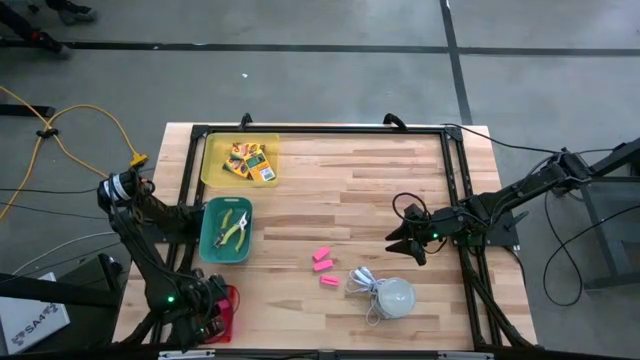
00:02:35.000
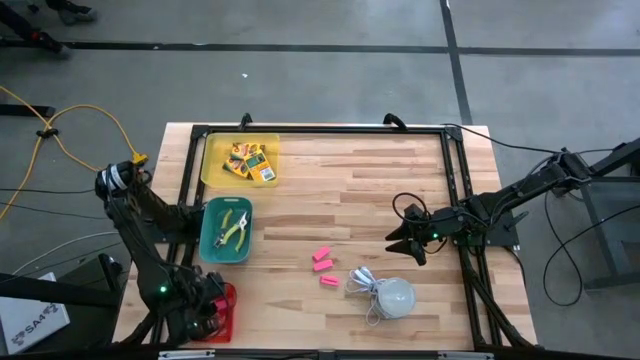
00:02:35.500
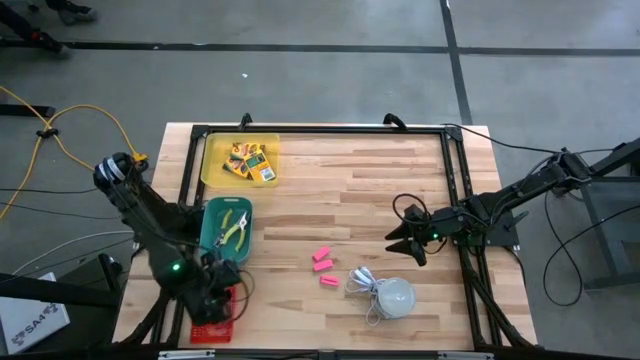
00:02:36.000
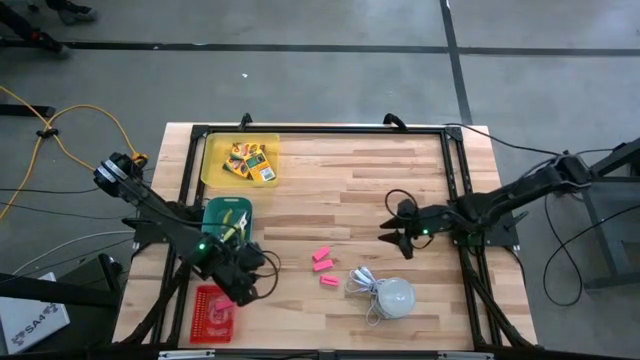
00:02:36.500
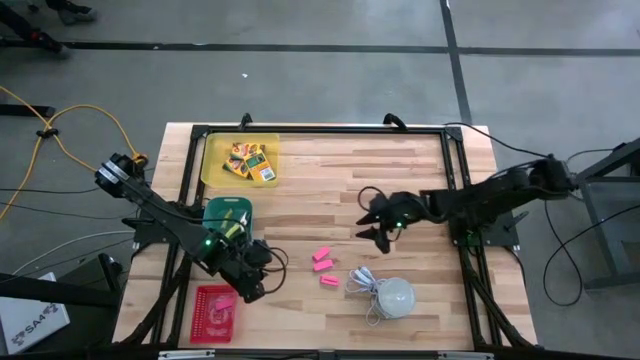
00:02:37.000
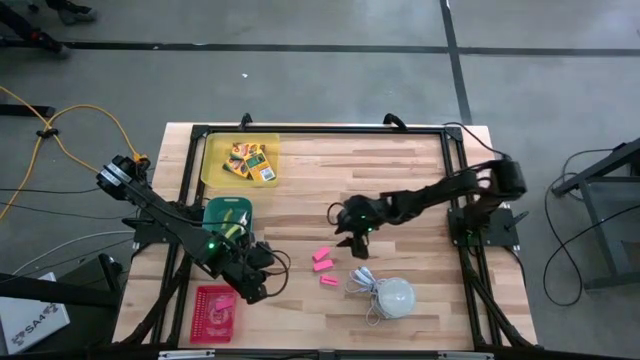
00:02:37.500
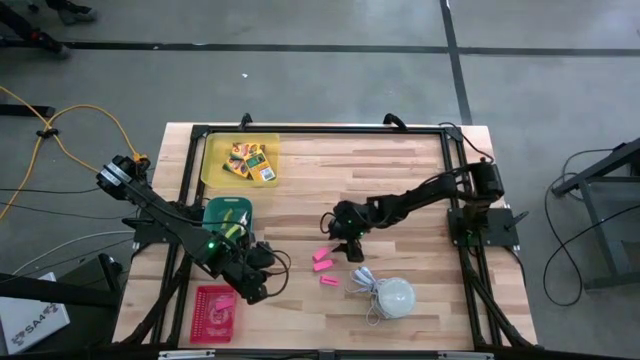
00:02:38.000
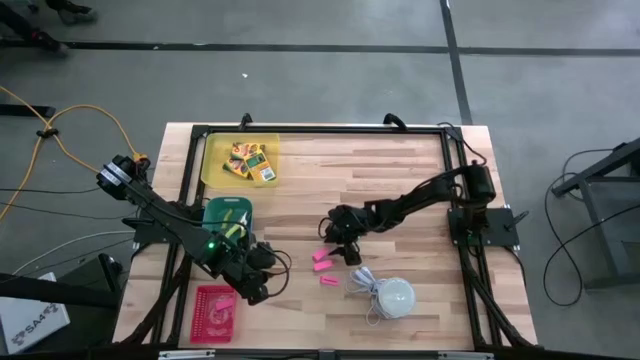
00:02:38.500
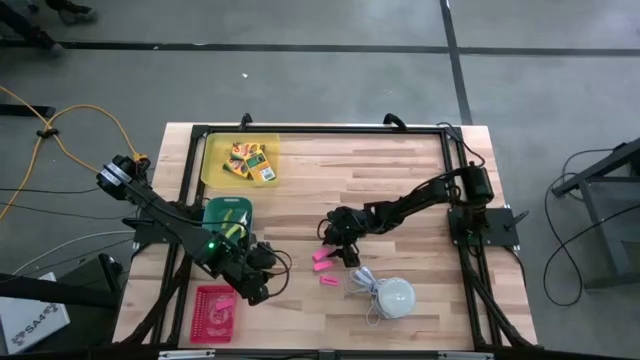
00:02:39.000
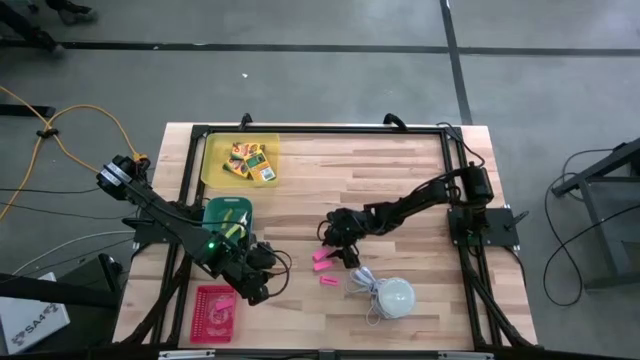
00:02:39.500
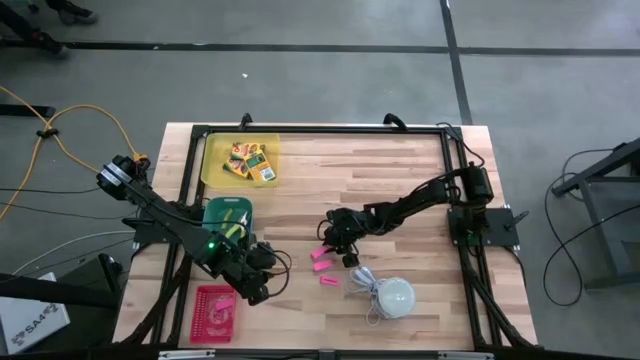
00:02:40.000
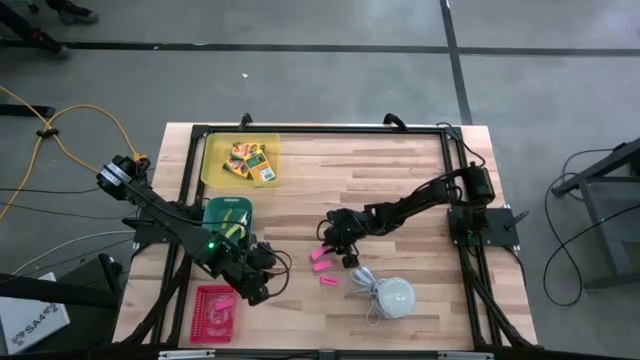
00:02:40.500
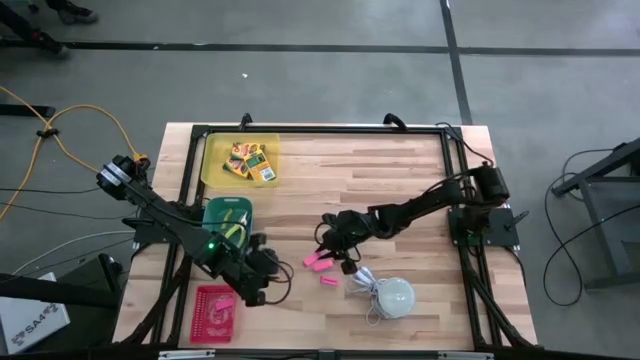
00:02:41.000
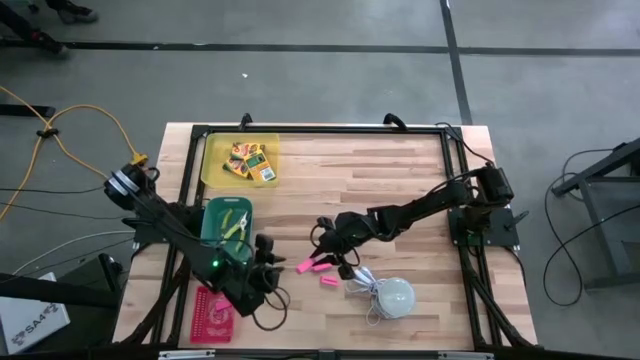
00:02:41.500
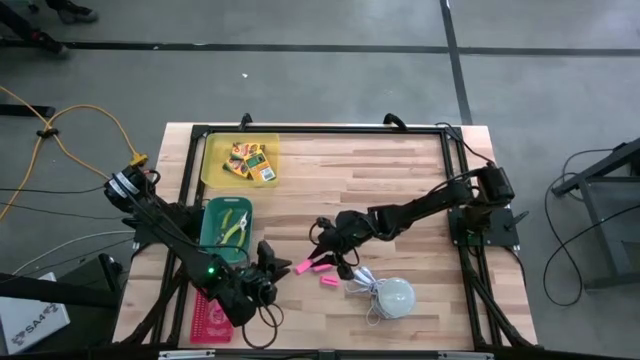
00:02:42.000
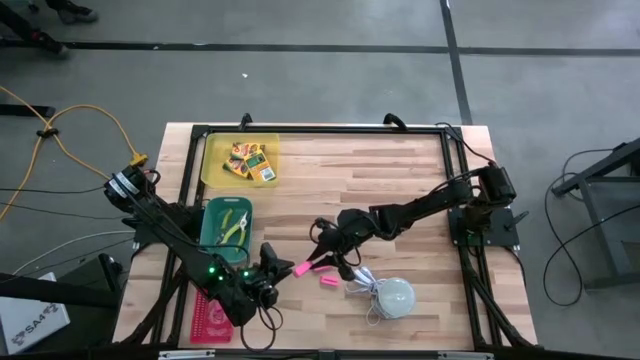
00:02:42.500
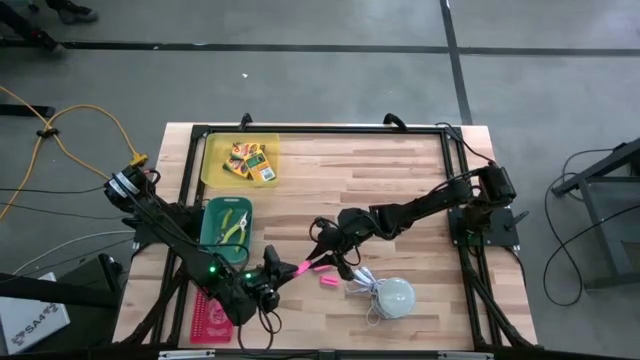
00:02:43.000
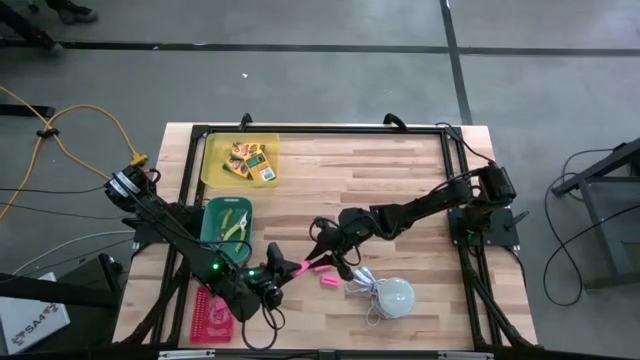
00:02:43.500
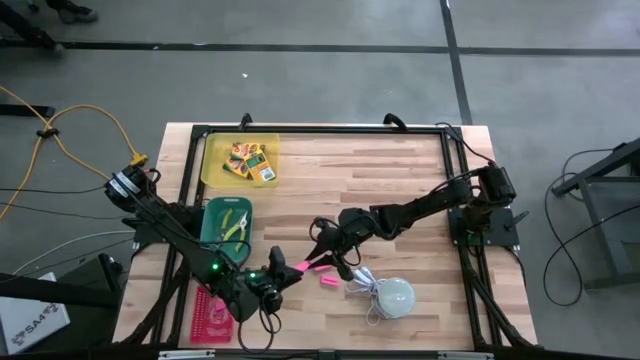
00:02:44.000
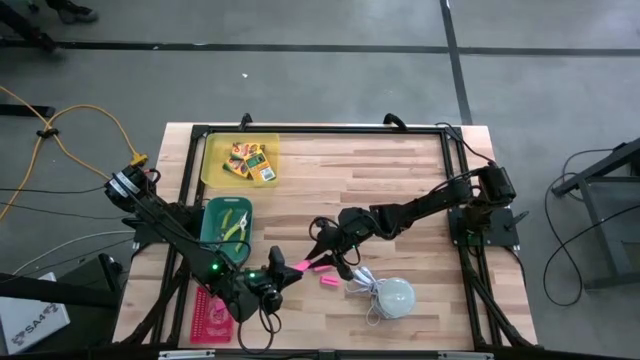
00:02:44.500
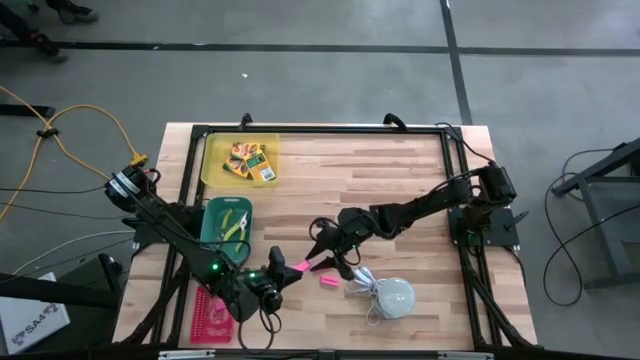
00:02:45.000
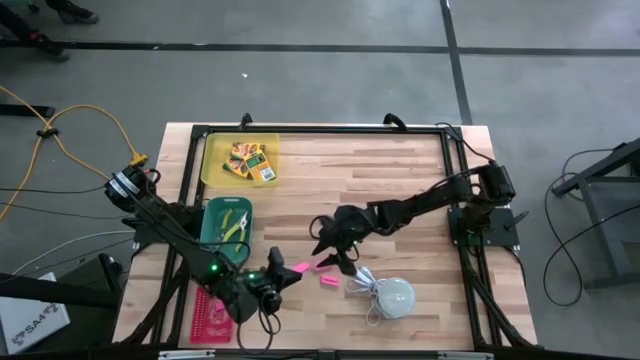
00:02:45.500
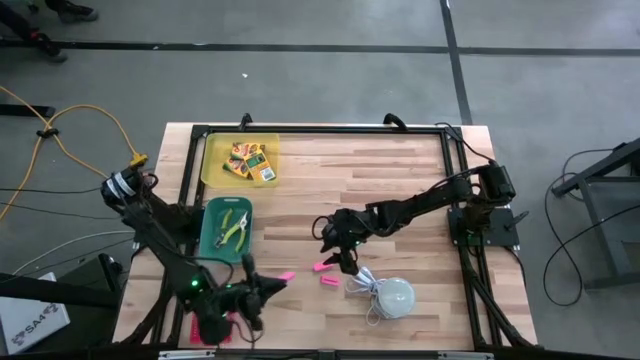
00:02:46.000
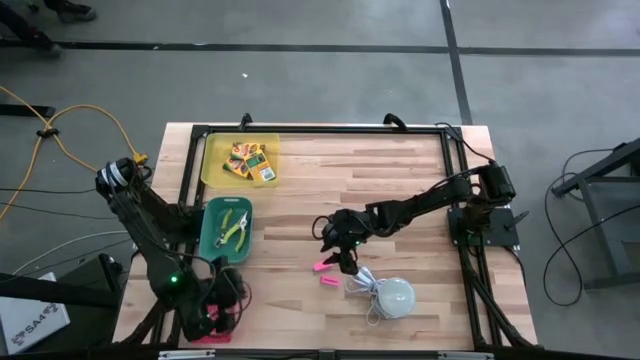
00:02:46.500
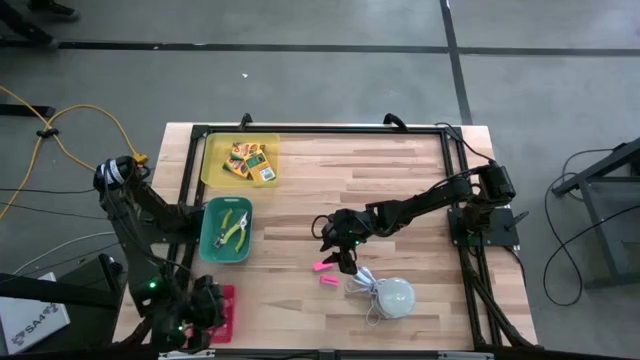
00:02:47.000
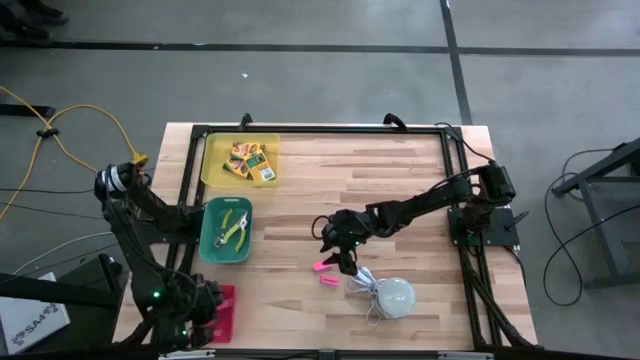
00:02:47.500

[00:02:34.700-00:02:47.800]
Task: Pick & Place School Supplies
Put the top pink eraser into the red basket

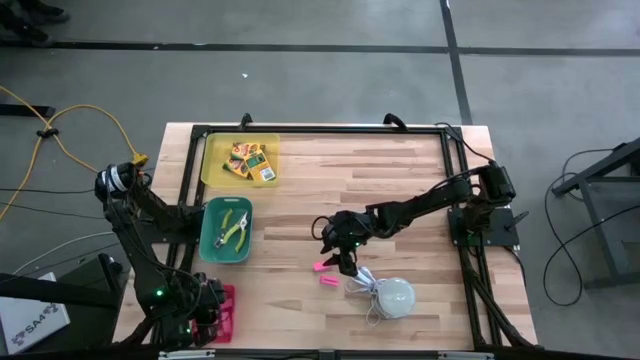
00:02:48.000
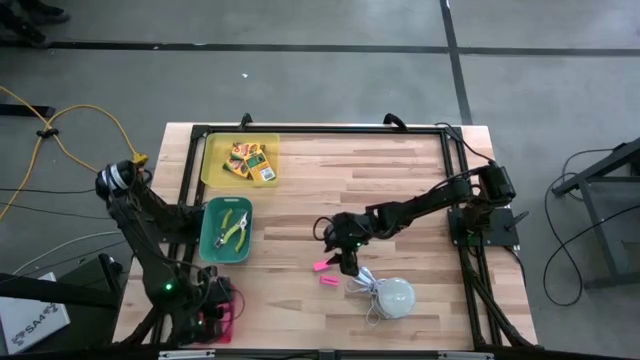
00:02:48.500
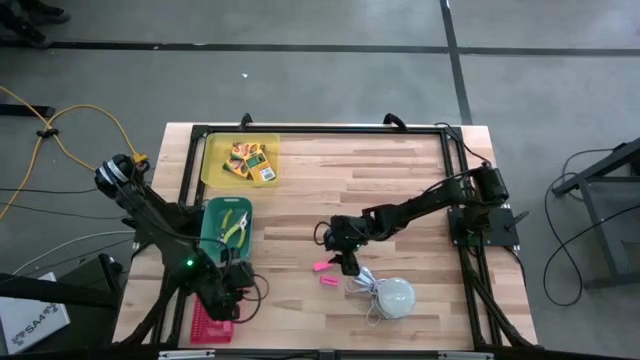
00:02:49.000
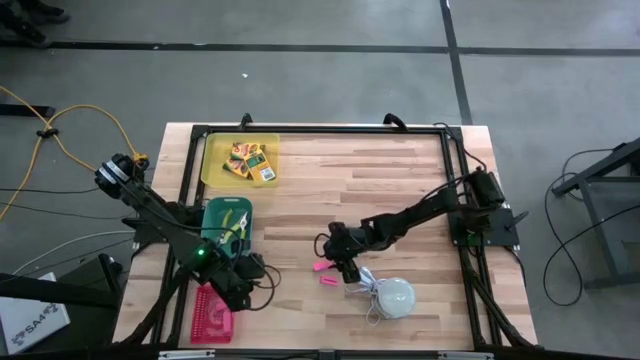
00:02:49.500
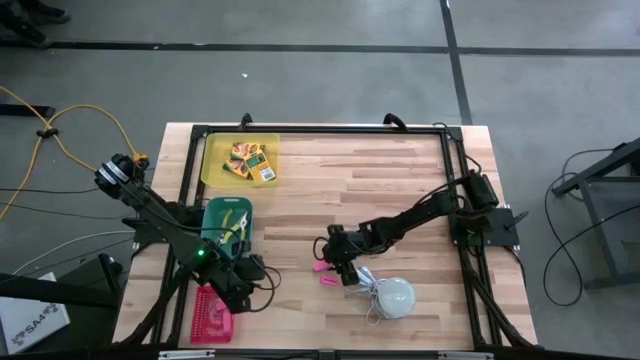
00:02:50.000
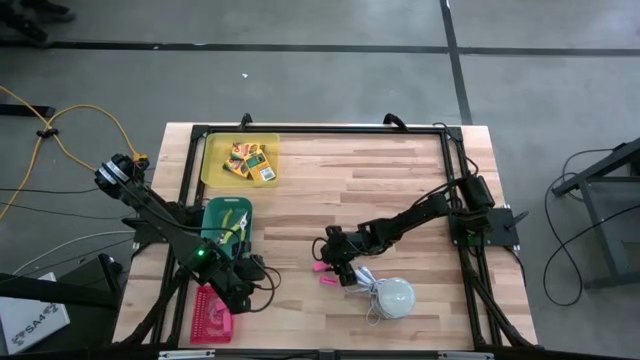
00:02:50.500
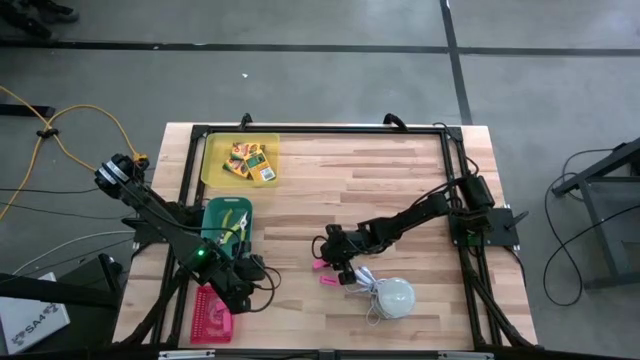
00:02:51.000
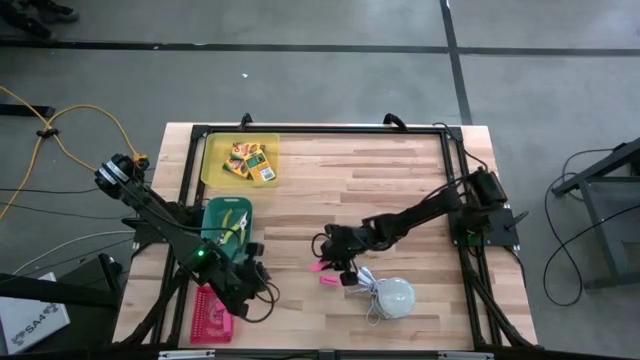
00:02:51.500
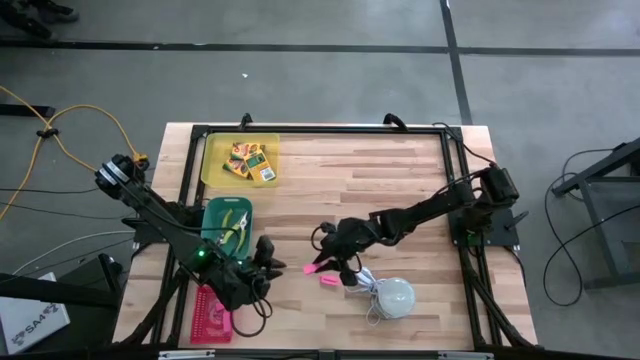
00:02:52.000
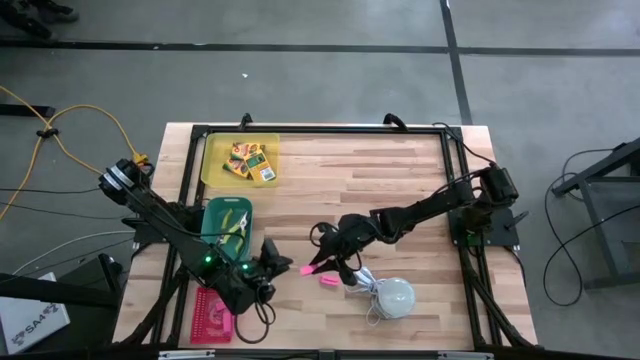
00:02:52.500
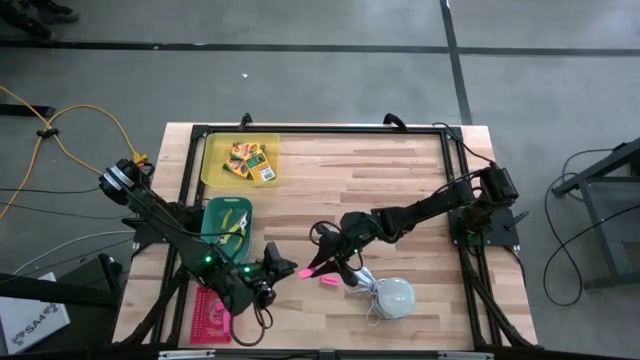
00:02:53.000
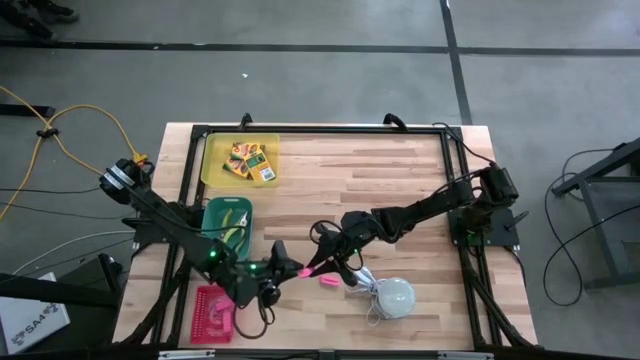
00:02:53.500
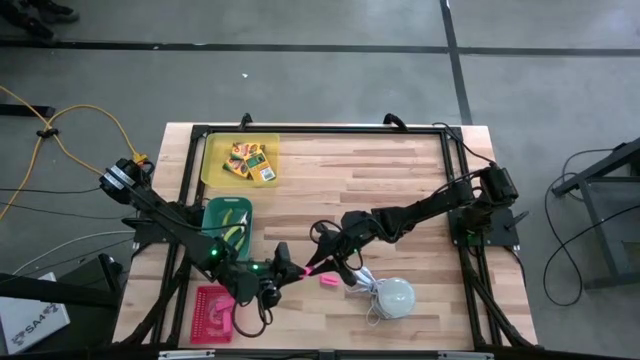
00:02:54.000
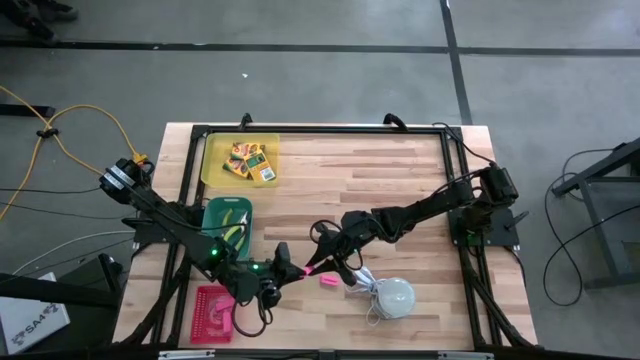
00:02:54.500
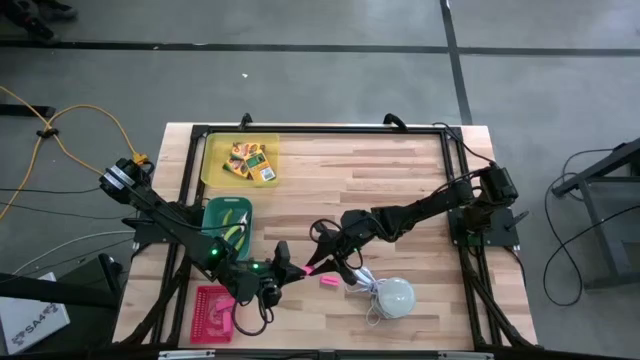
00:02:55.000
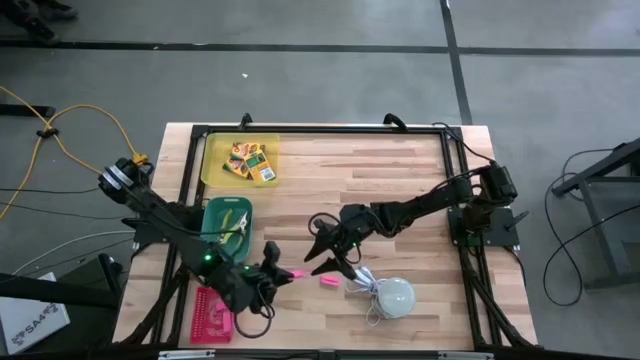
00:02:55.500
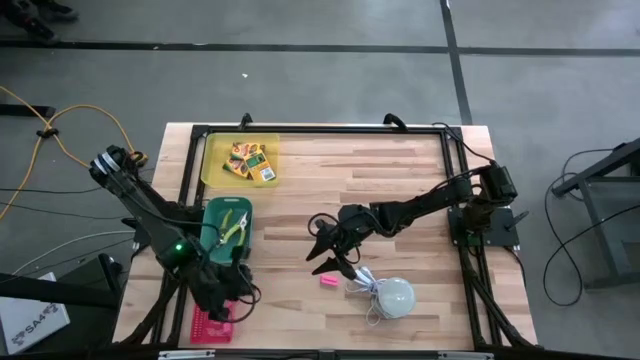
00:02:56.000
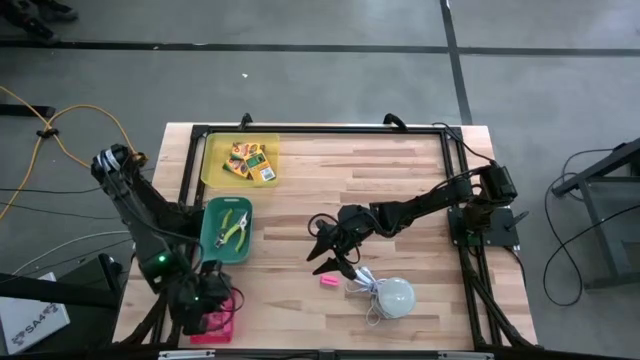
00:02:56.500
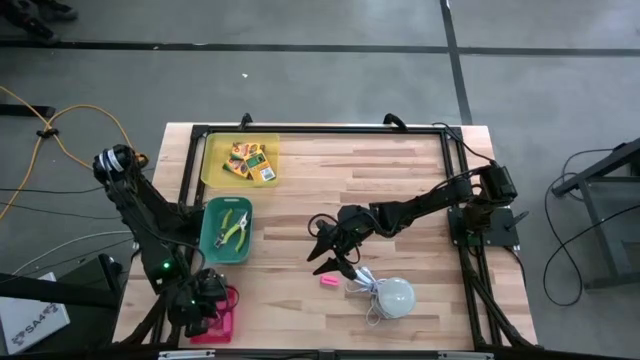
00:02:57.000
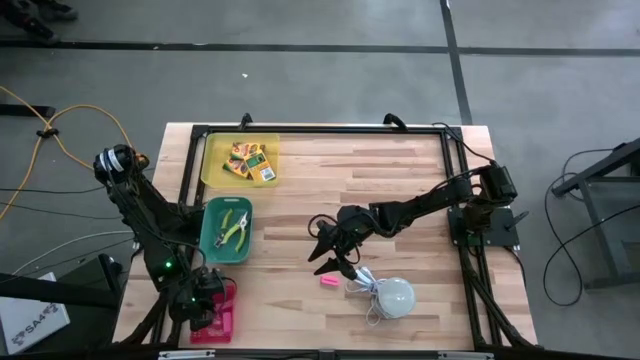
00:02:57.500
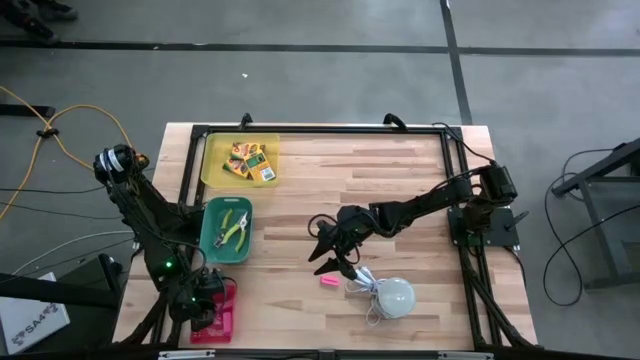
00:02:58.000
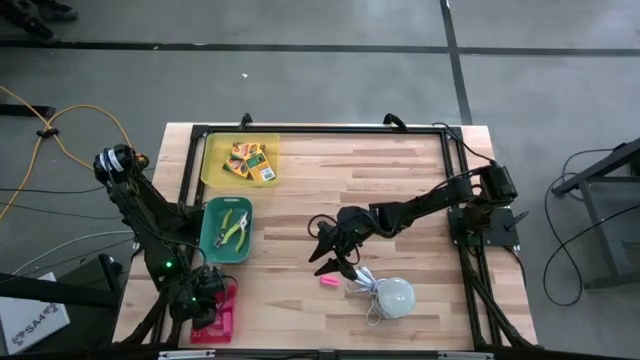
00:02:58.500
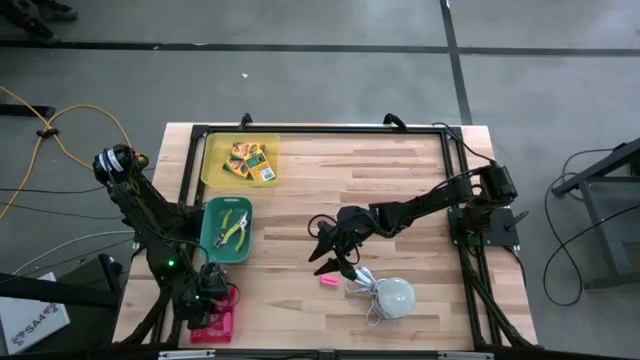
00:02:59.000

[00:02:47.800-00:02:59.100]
Put the top pink eraser into the red basket
